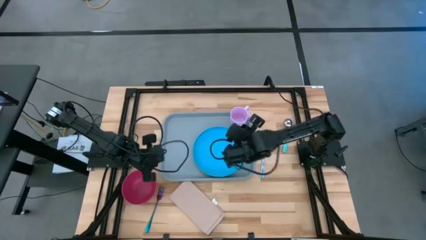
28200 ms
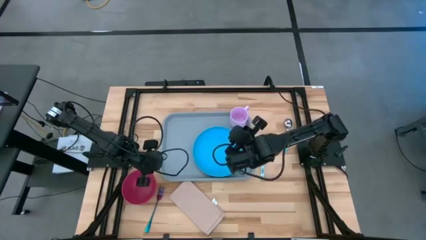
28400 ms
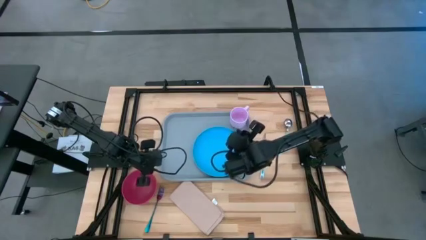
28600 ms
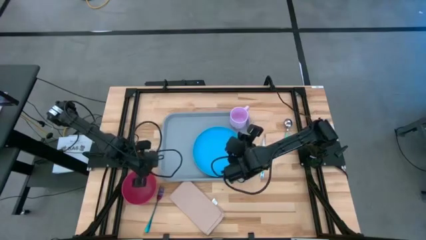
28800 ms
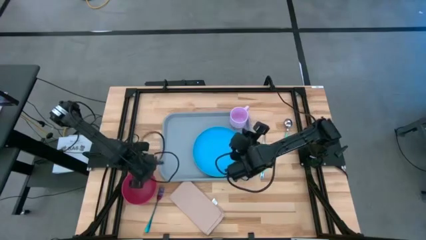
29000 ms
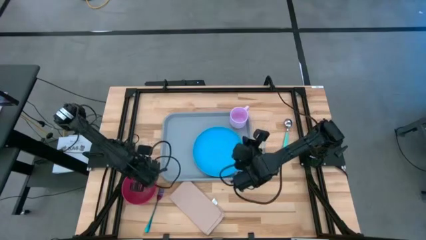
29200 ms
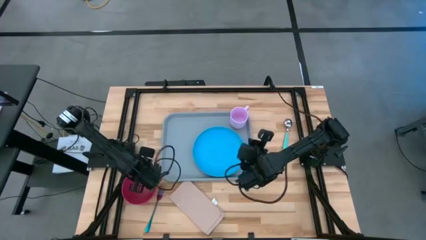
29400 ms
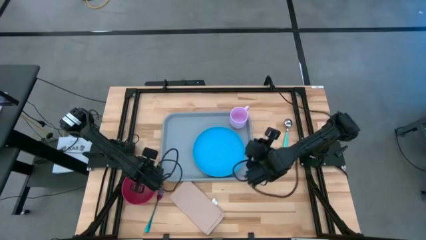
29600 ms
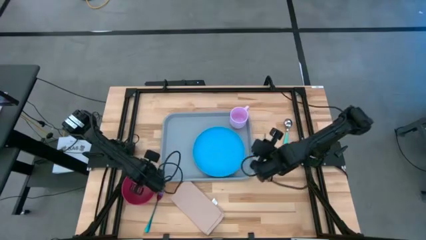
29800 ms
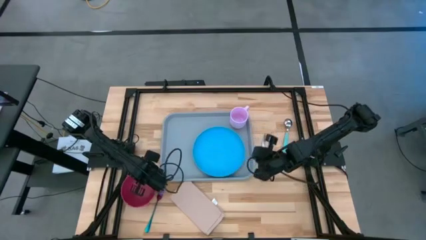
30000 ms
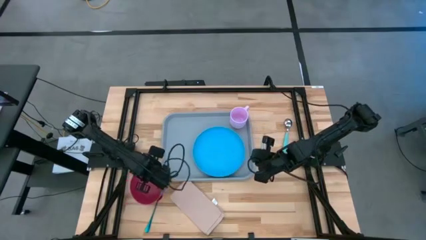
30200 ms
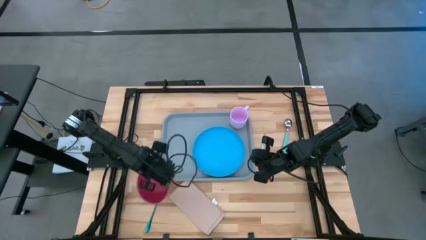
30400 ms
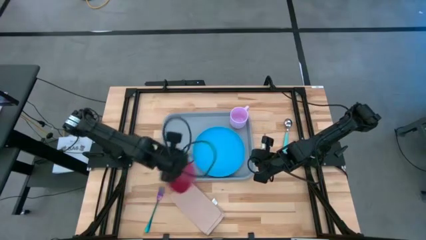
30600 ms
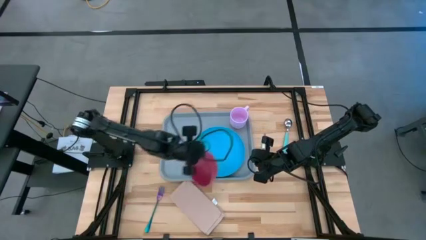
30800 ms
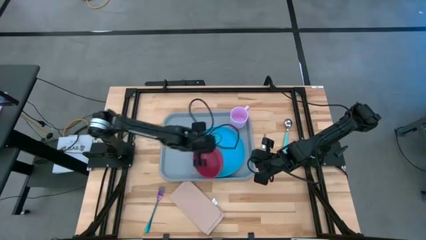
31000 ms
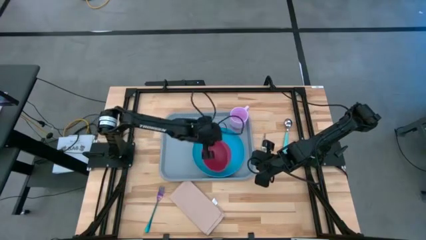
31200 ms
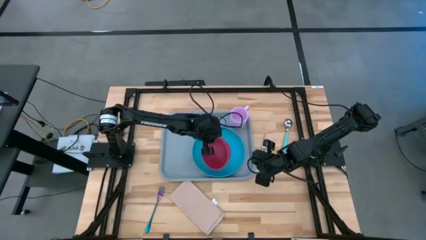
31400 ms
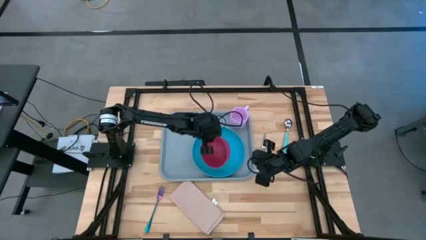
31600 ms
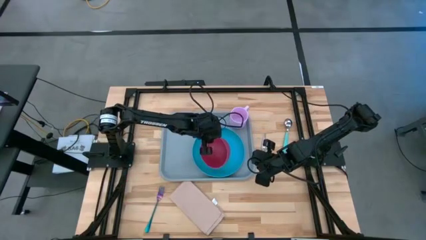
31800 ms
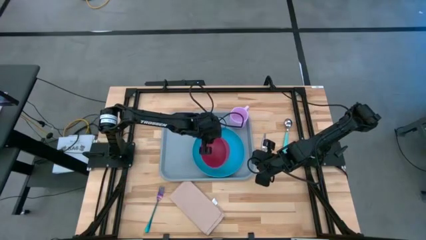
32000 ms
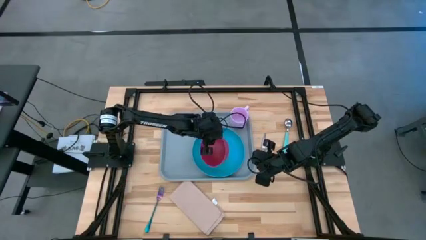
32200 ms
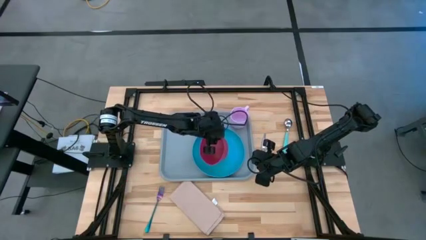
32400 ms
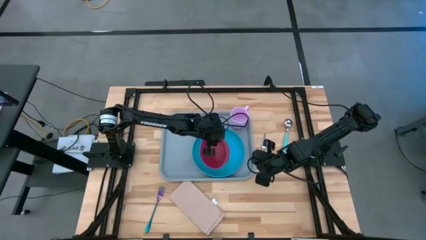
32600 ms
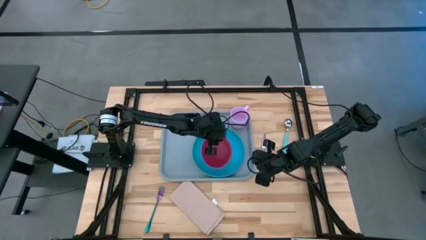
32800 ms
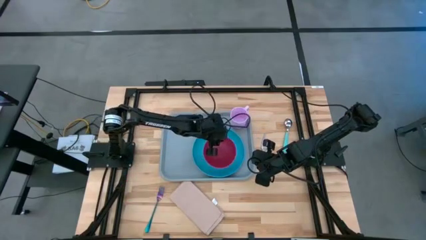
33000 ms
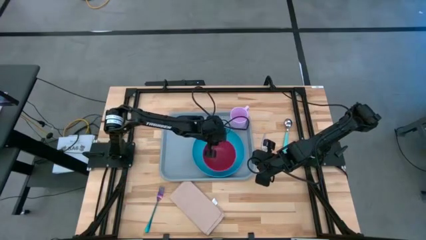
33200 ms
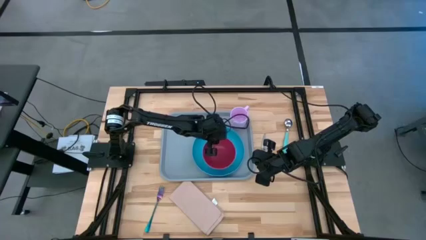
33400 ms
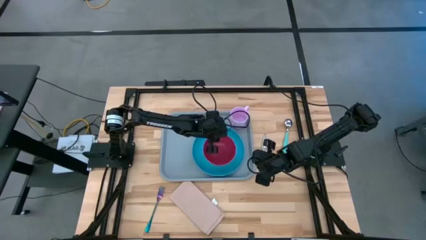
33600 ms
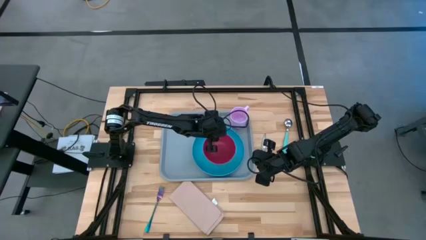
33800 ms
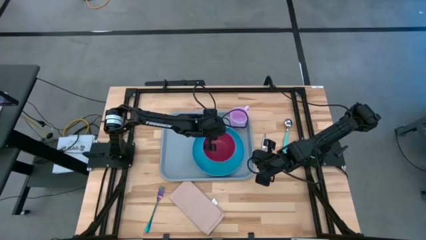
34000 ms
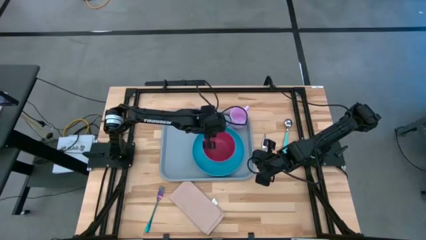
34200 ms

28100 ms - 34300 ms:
Task: Set up tray
Put the pink bowl on the blue plate

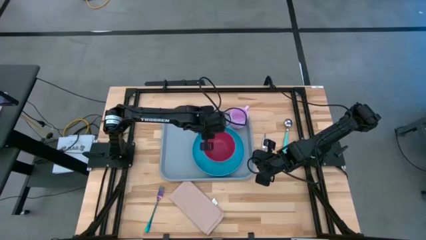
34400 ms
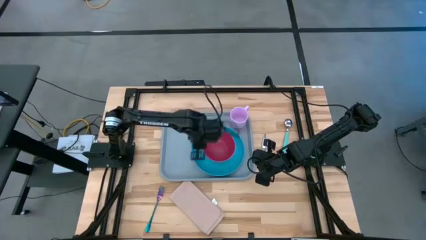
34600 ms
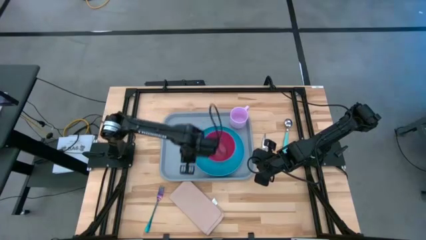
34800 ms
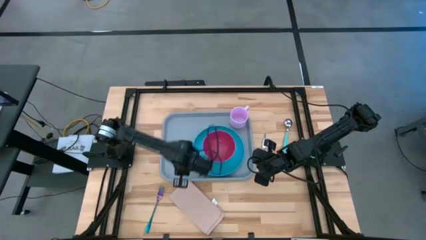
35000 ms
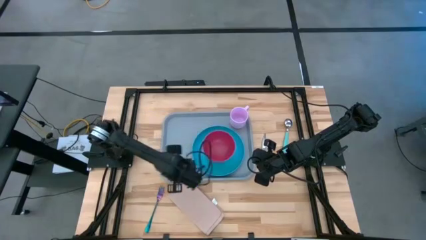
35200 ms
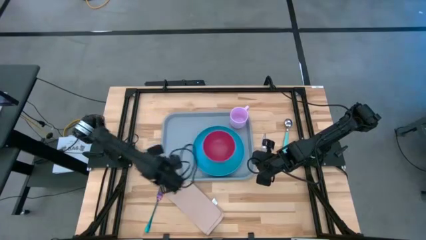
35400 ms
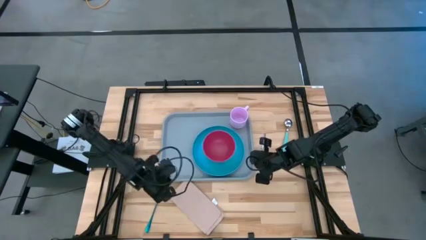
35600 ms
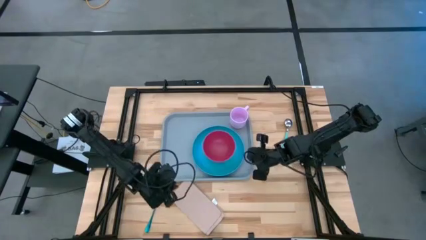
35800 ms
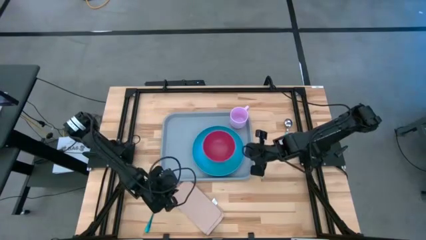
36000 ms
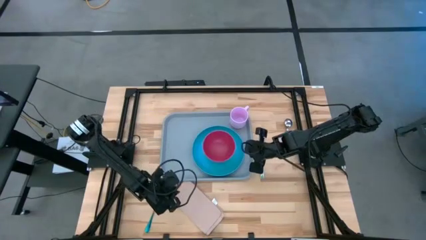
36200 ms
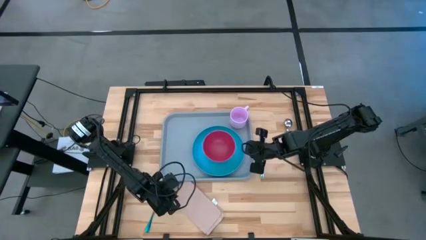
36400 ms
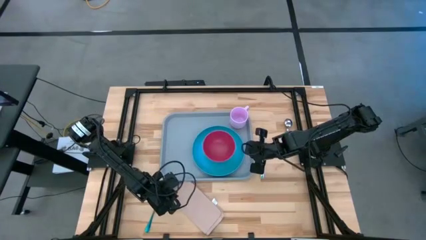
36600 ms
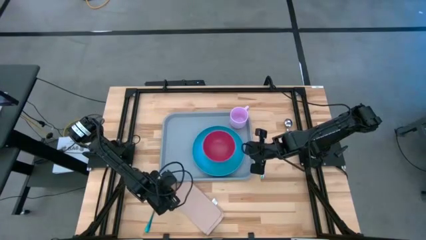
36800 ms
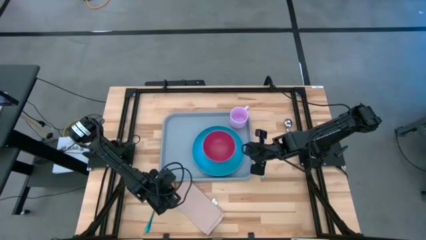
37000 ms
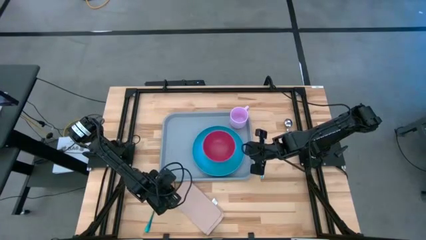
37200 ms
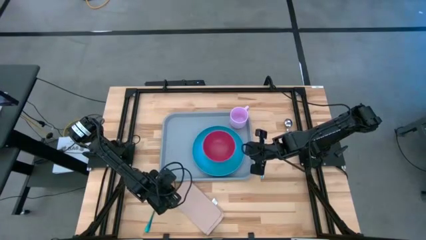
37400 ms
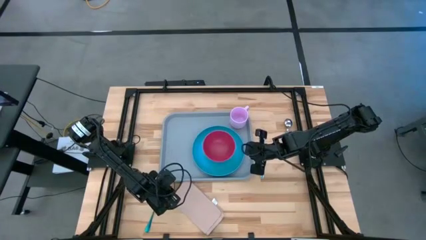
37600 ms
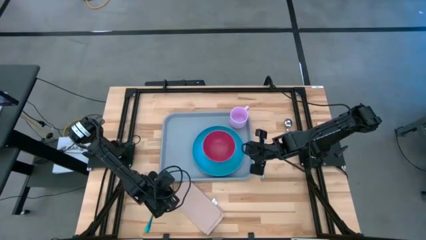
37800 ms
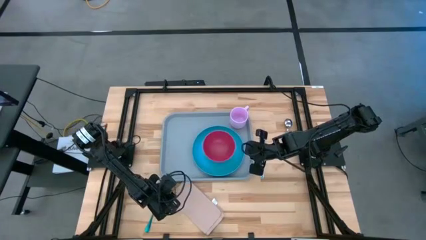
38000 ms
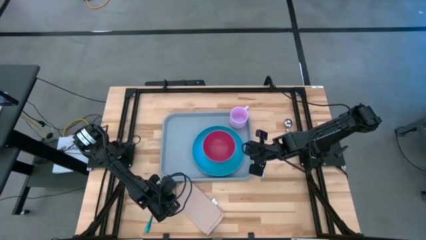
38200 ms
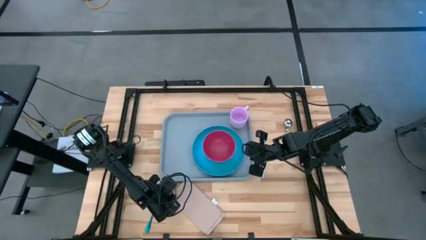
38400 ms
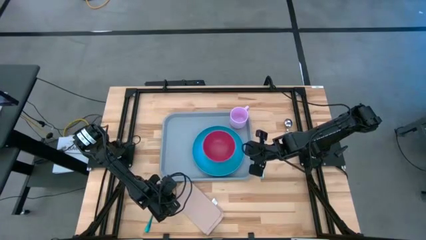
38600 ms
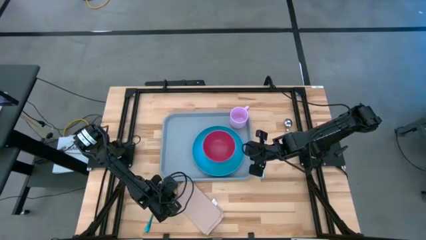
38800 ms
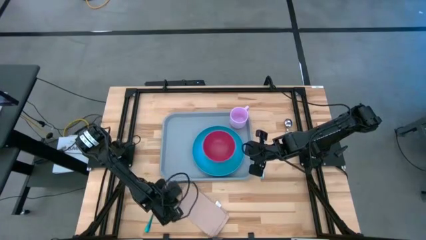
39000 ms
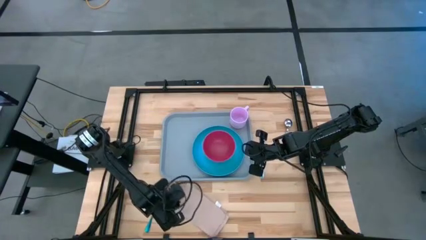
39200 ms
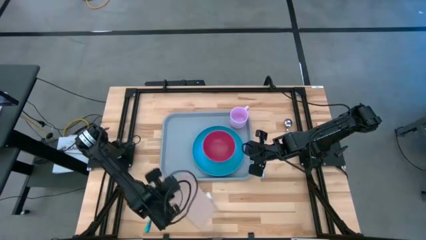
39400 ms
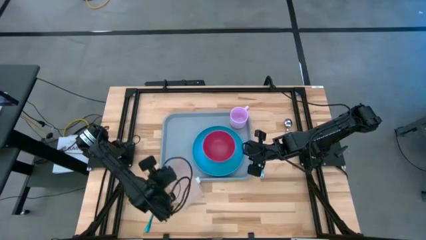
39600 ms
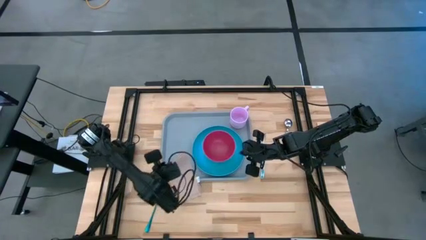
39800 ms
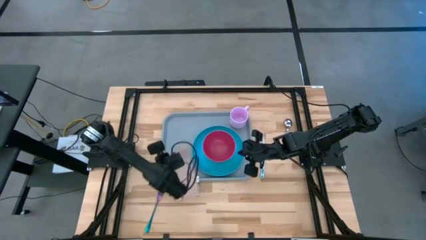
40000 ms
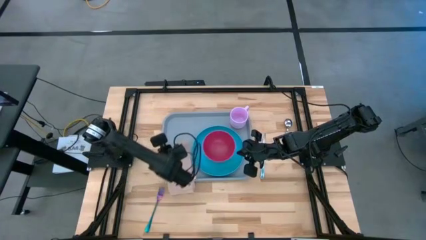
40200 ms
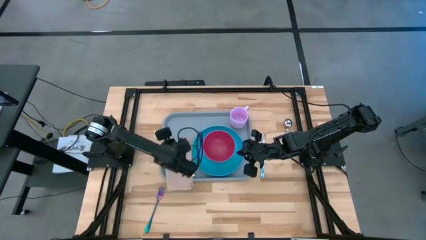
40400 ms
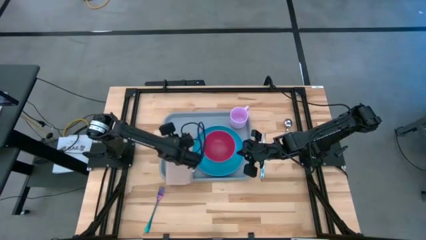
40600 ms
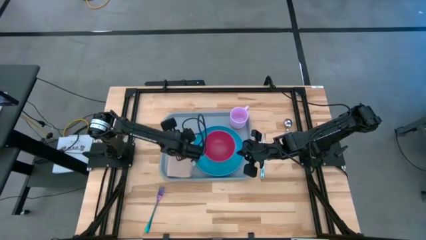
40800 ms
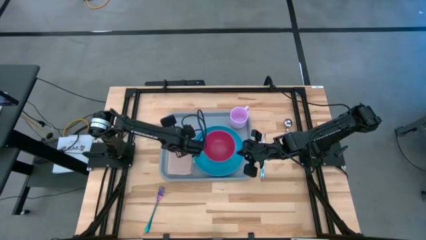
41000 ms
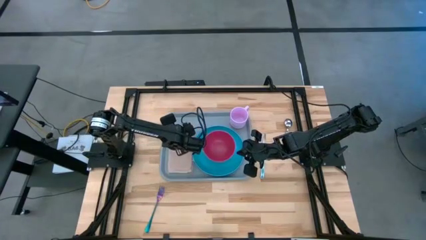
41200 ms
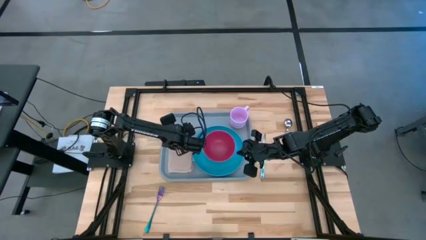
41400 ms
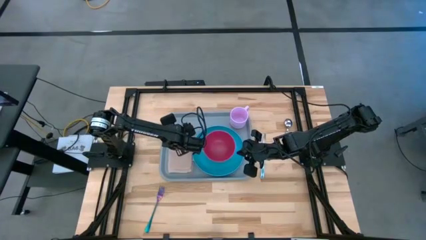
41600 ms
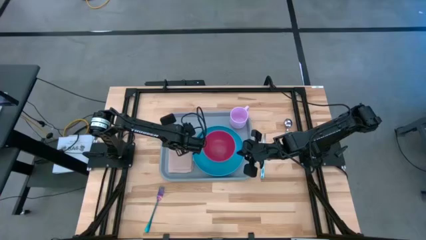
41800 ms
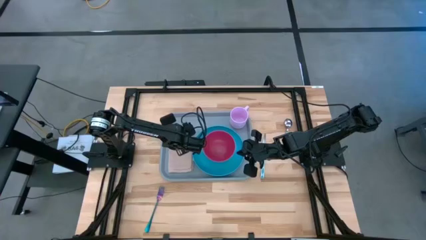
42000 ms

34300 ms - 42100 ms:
Put the brown napkin on the gray tray to the right side of the blue plate

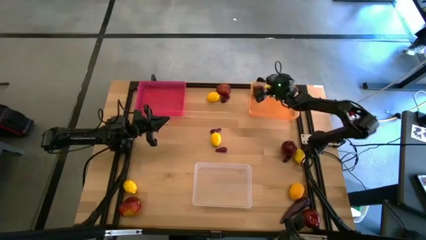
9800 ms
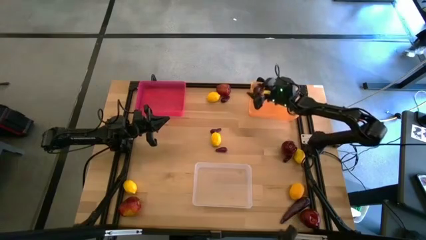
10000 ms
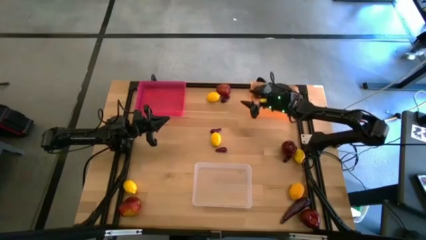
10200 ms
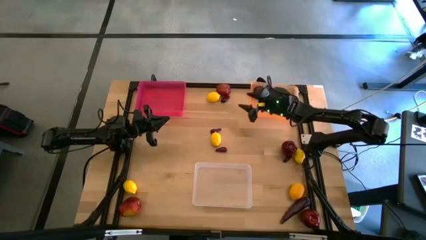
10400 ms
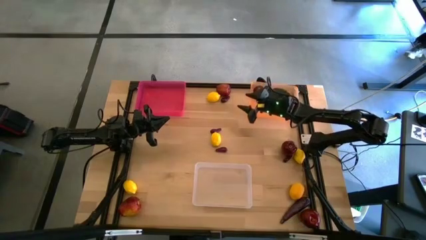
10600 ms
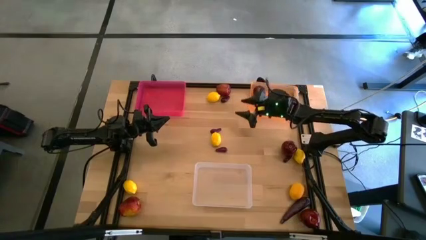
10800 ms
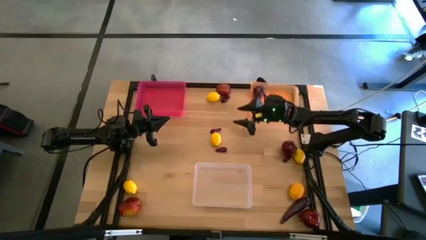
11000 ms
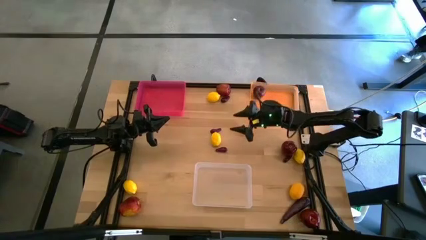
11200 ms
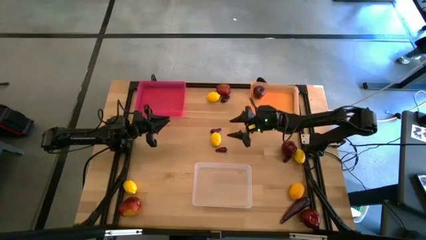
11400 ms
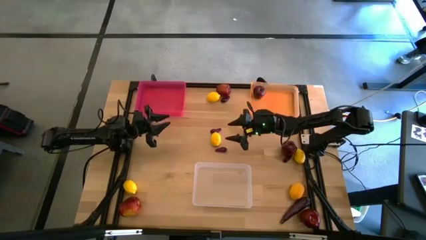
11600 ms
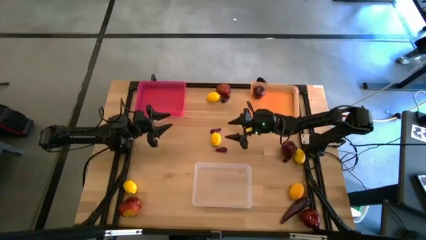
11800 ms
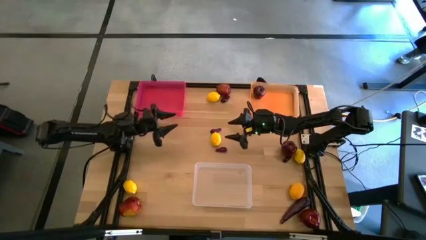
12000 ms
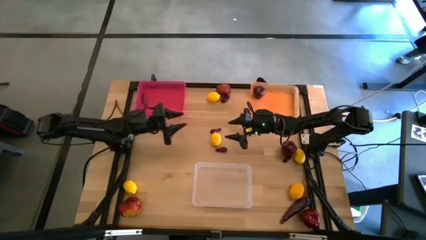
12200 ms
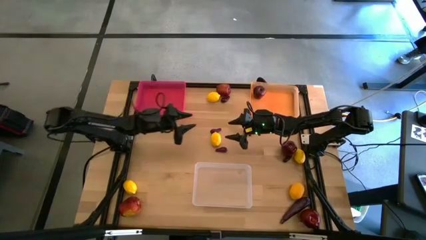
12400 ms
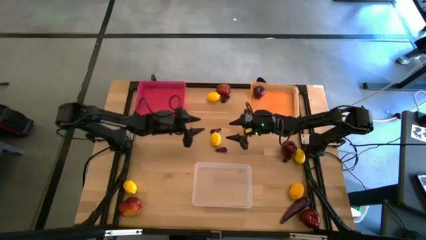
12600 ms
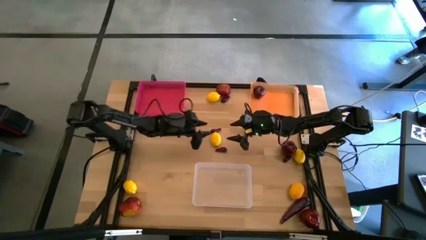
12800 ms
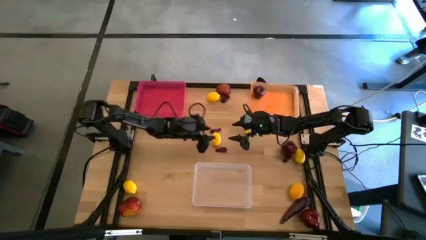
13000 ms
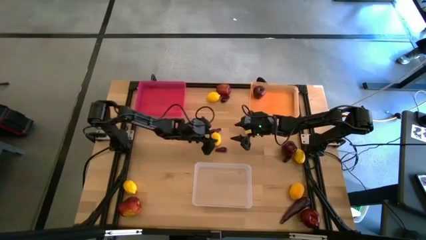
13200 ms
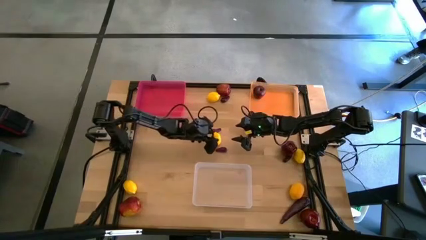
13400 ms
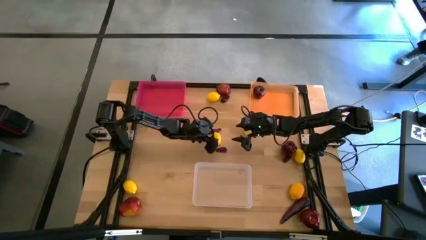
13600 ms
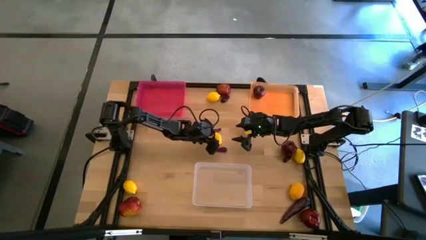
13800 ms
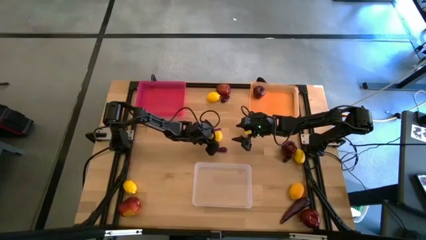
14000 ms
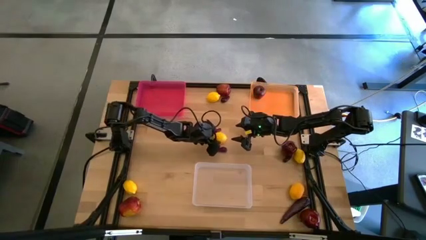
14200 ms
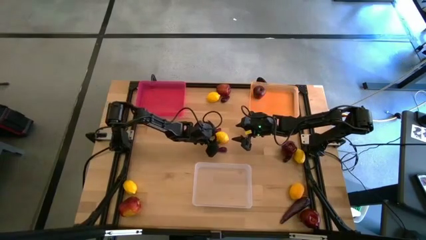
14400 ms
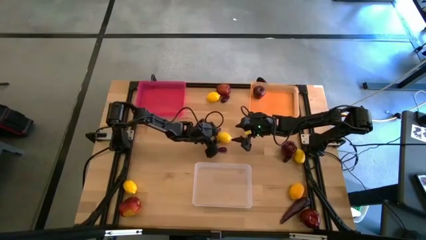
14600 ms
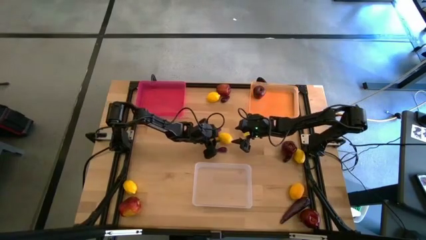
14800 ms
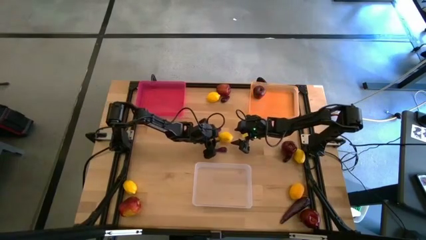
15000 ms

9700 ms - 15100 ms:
Task: Sort produce into baskets
Put the lemon into the red bin
